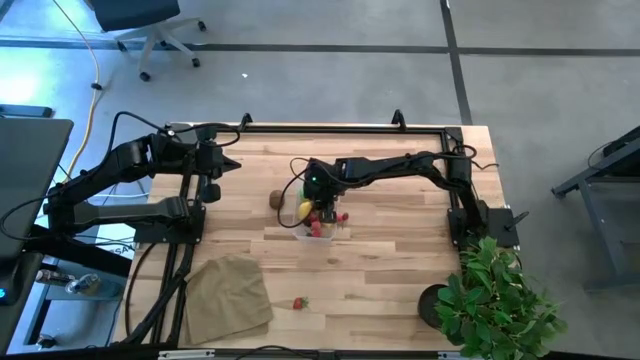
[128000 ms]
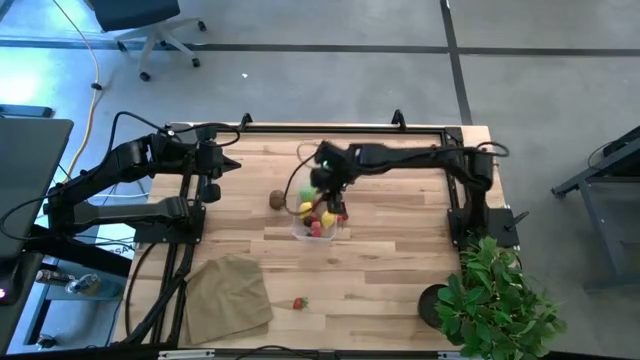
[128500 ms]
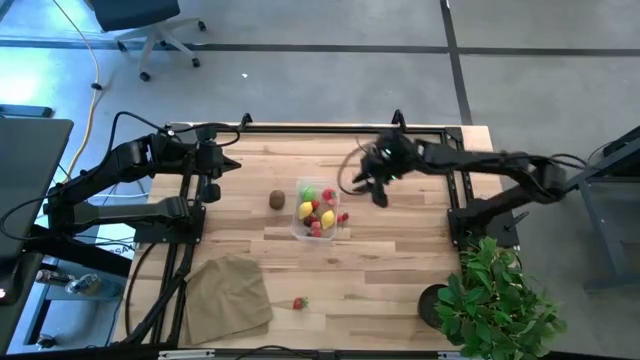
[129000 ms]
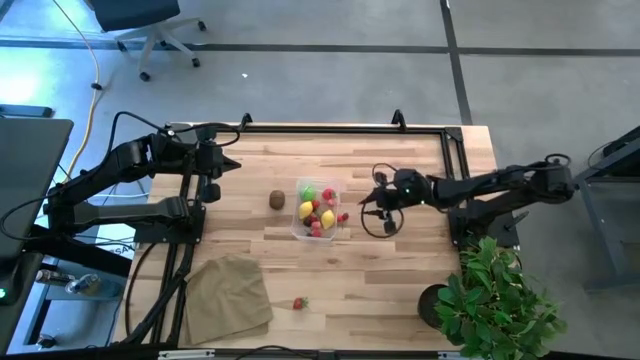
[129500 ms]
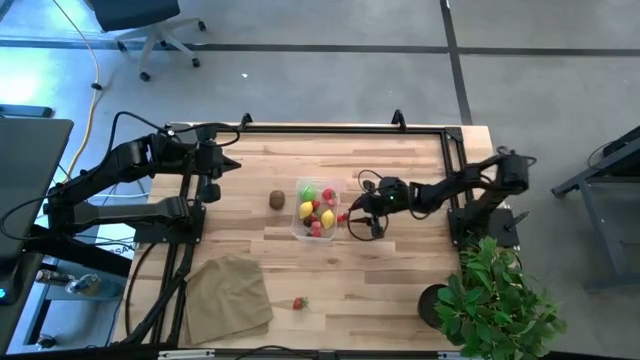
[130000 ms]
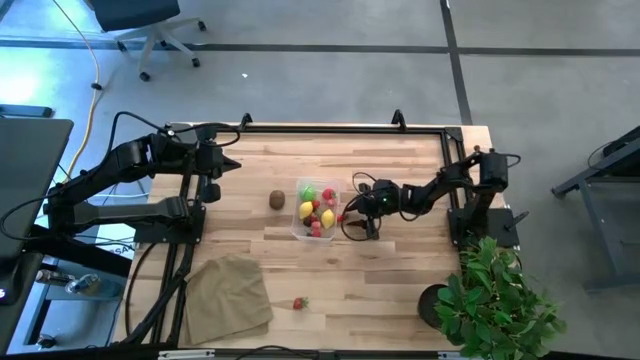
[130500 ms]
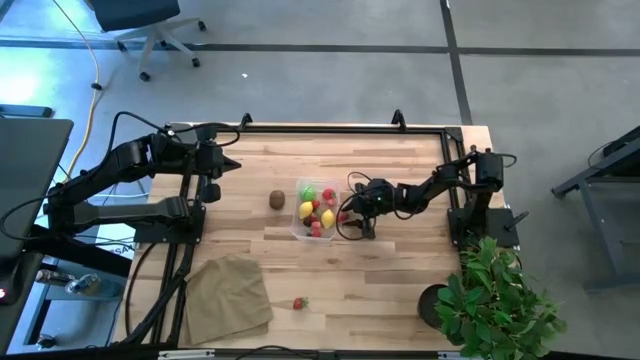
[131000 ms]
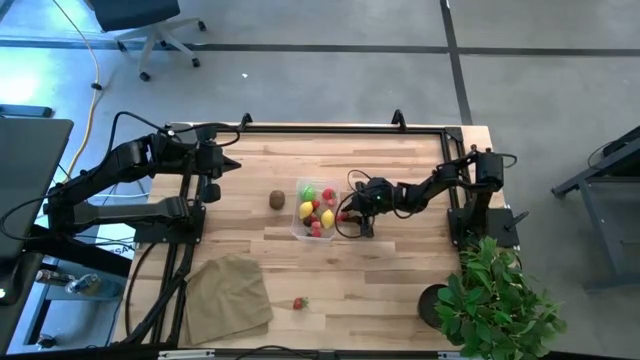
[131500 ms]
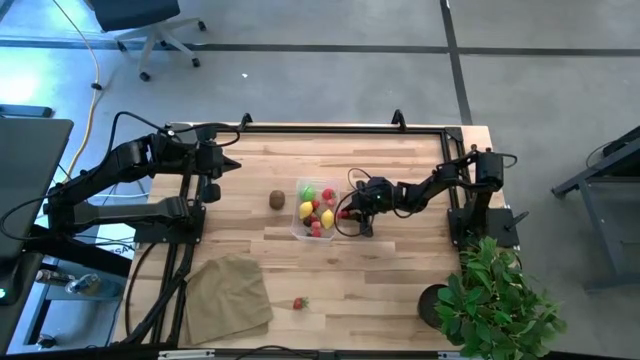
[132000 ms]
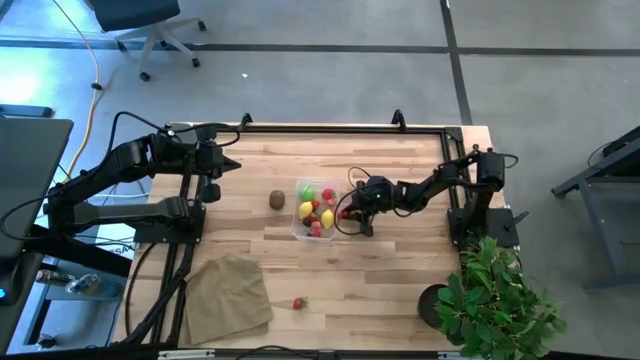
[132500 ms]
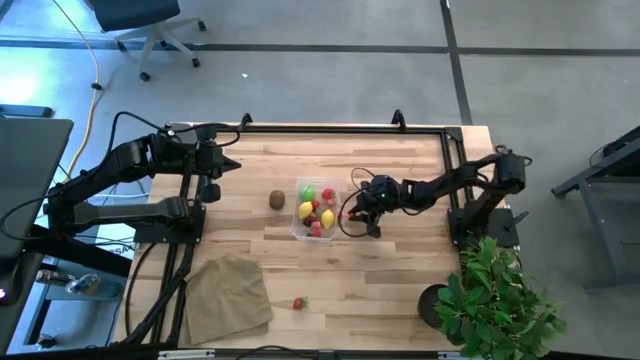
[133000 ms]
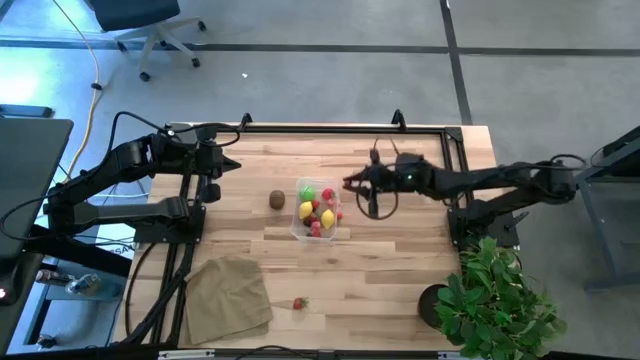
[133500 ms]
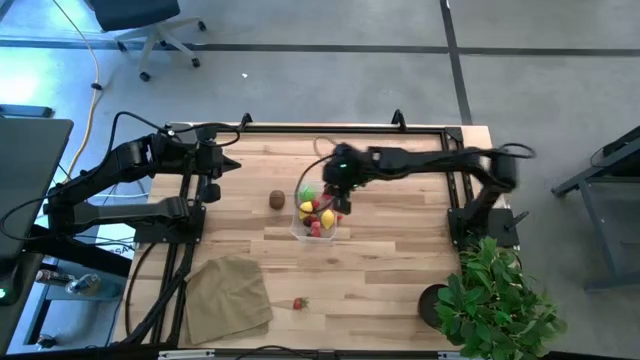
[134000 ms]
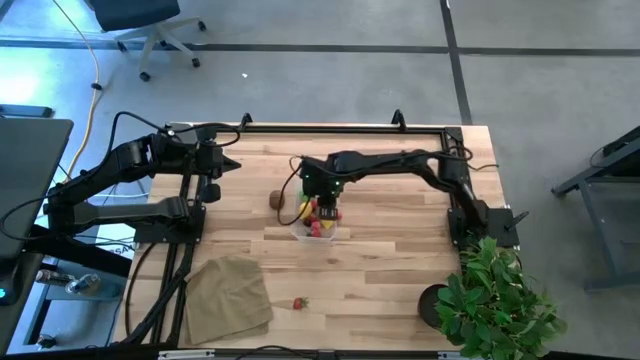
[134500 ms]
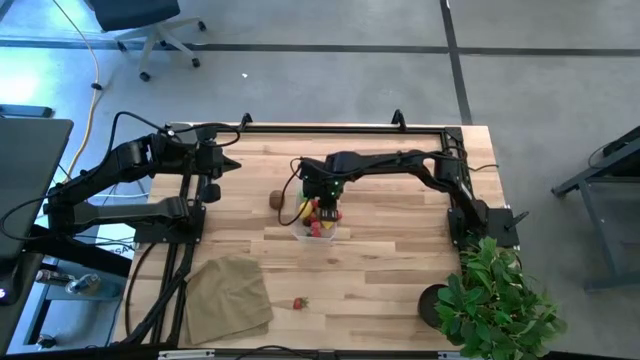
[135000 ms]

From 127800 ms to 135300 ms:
Task: Pick and placing Produce into tupperware
Put the dark red cherry into the transparent bin

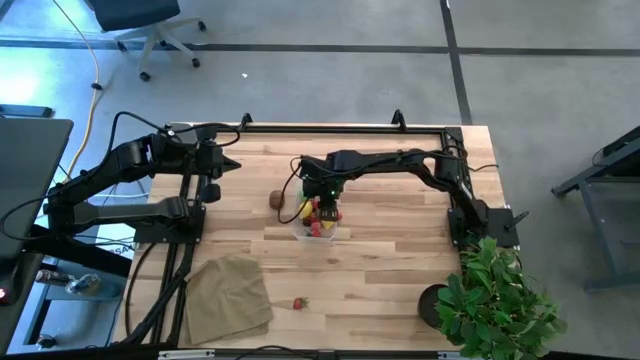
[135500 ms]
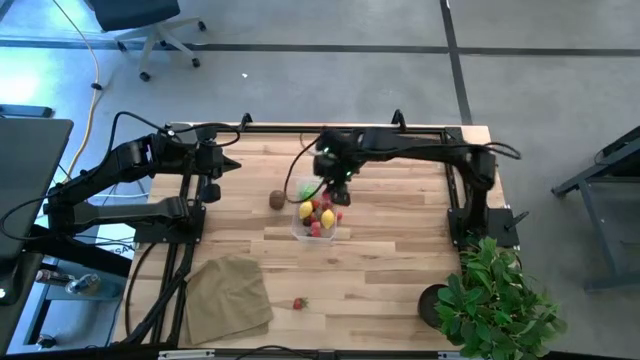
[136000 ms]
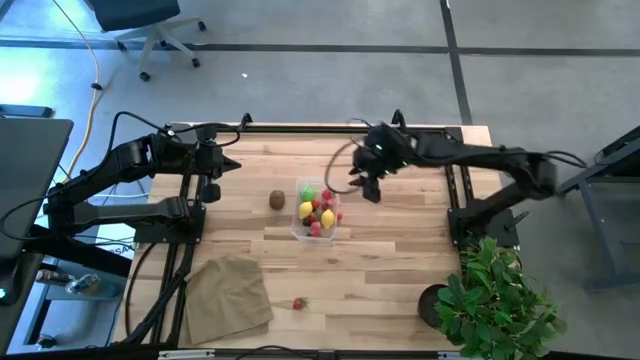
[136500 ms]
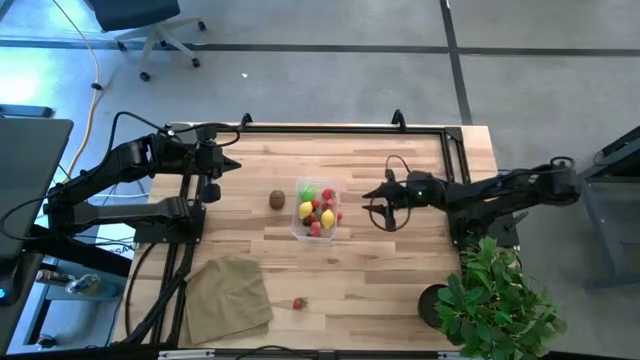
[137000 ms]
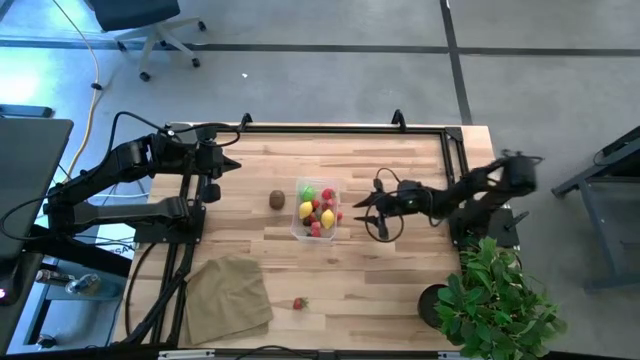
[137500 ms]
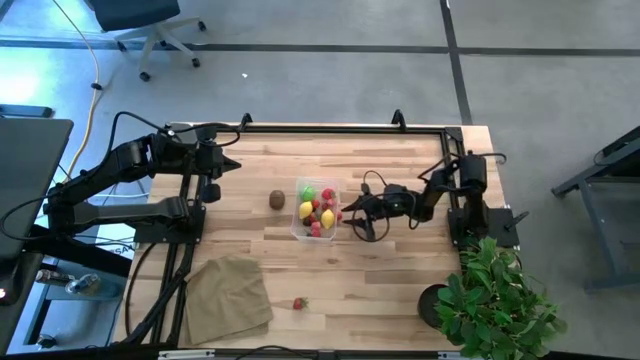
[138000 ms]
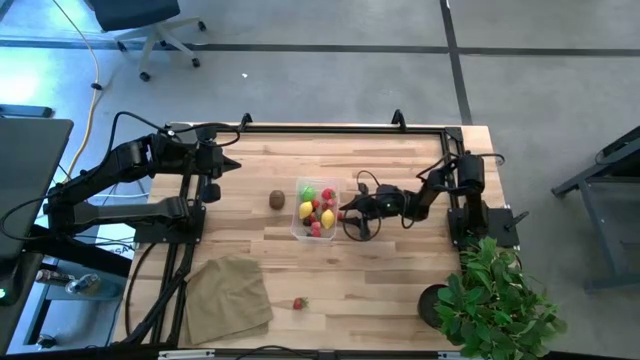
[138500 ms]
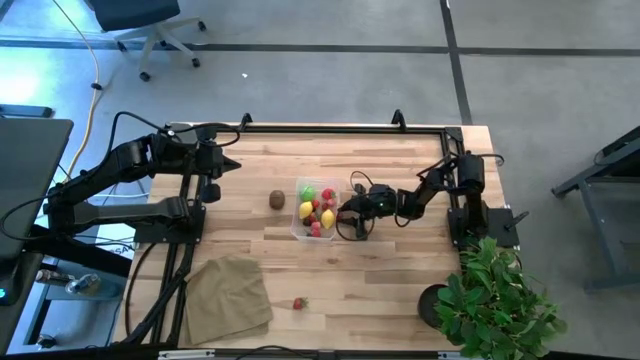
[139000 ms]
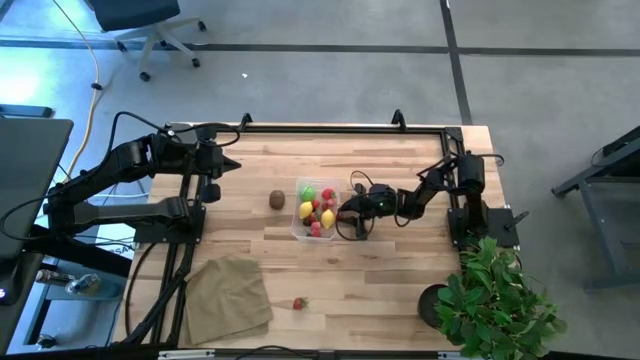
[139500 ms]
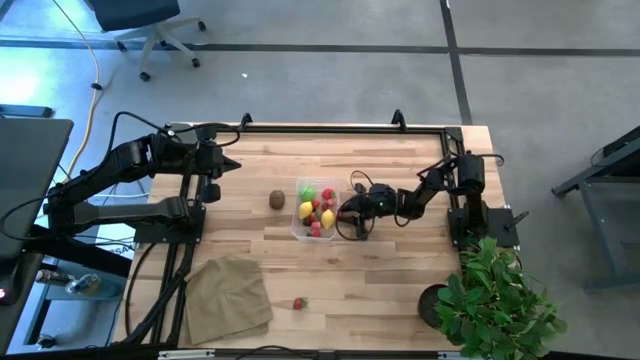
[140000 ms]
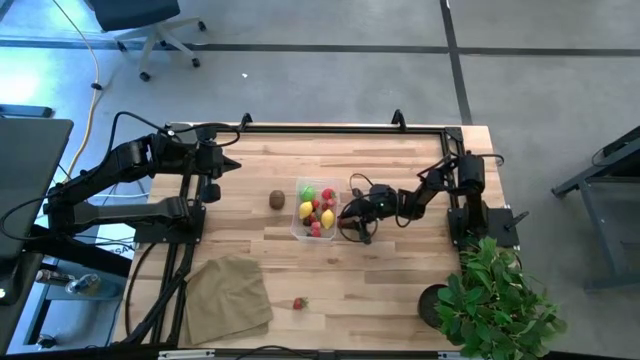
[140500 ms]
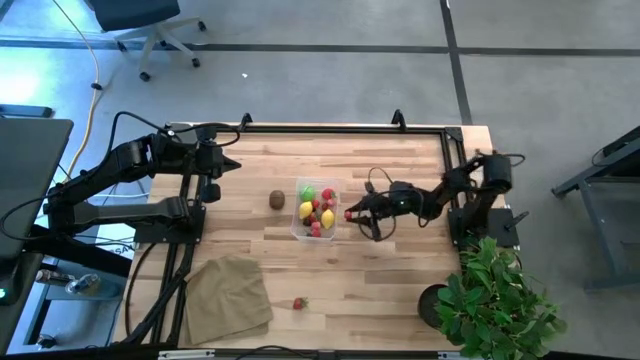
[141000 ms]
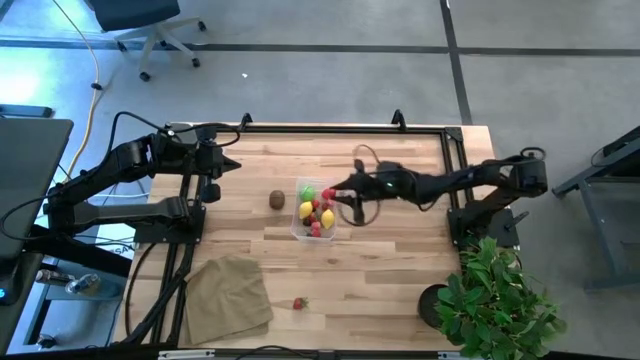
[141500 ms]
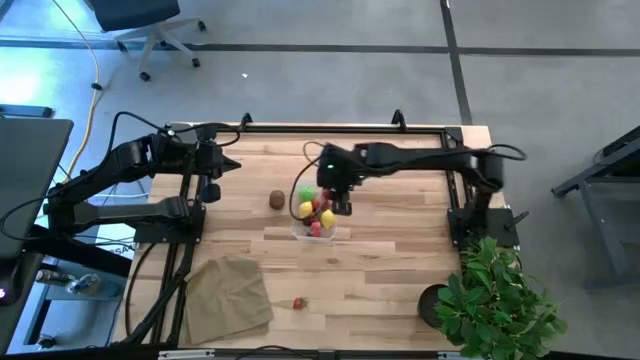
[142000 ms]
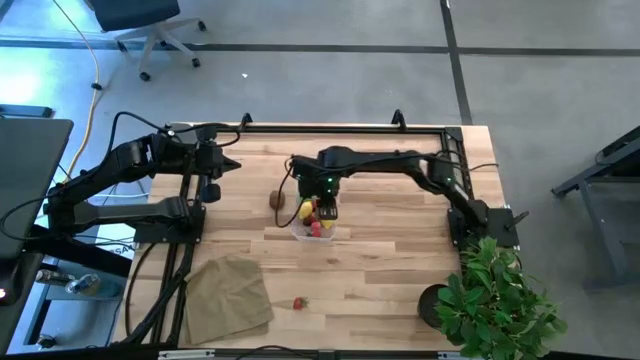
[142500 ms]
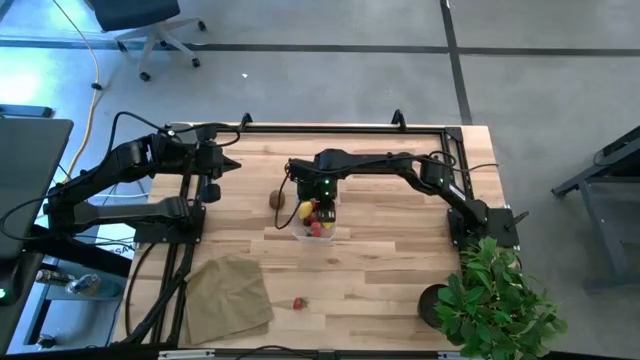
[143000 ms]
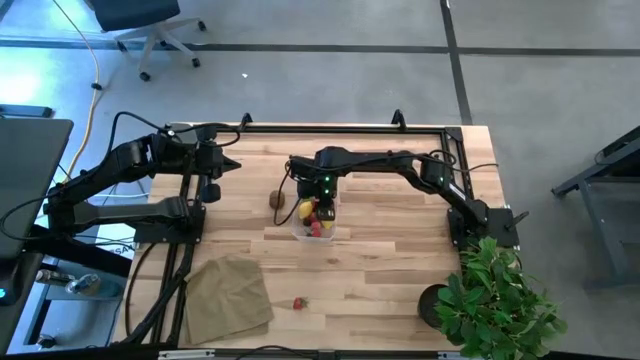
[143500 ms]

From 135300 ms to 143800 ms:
Put the red cherry into the transparent bin

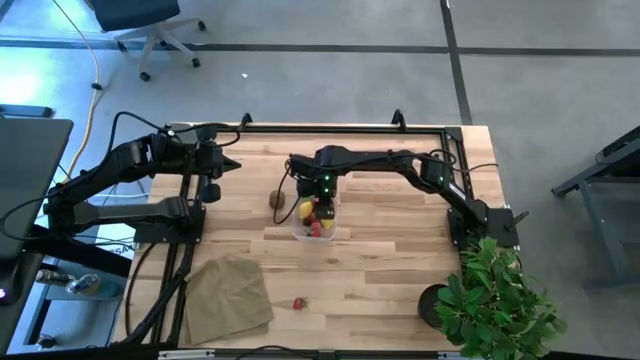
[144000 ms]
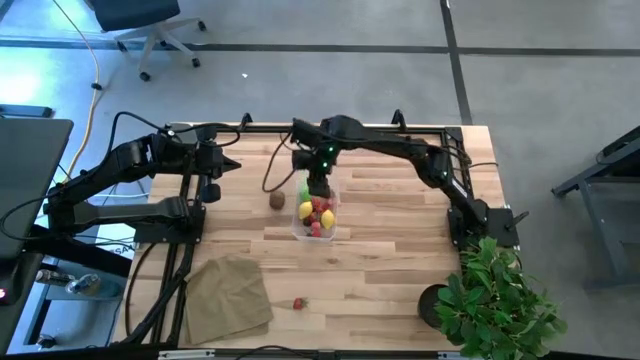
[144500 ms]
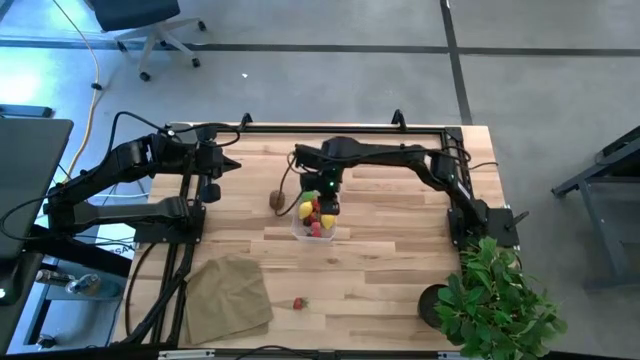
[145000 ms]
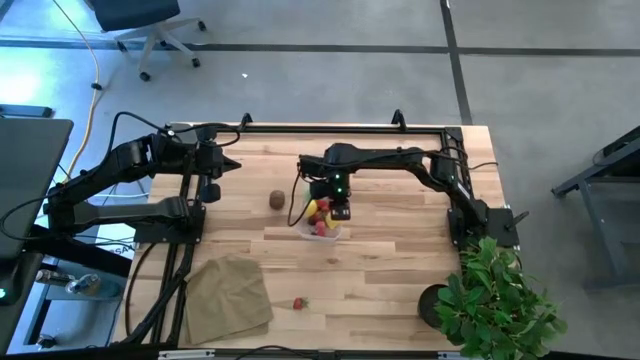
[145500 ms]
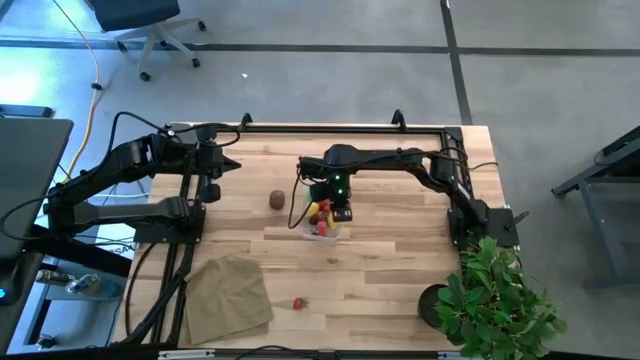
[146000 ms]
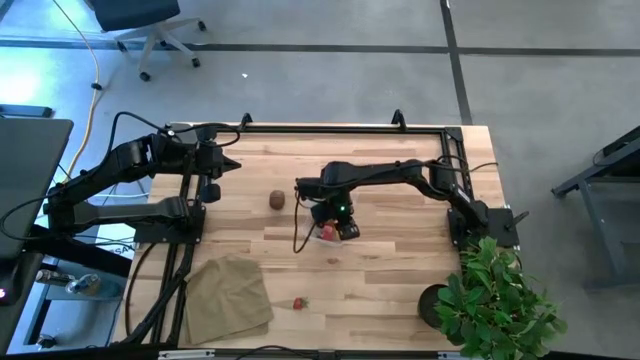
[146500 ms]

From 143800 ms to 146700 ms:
Adjust the transparent bin to the center of the table

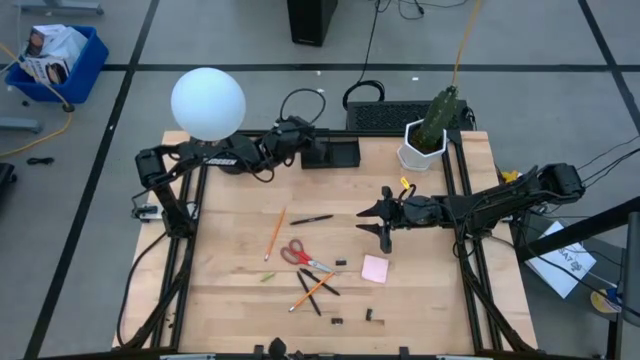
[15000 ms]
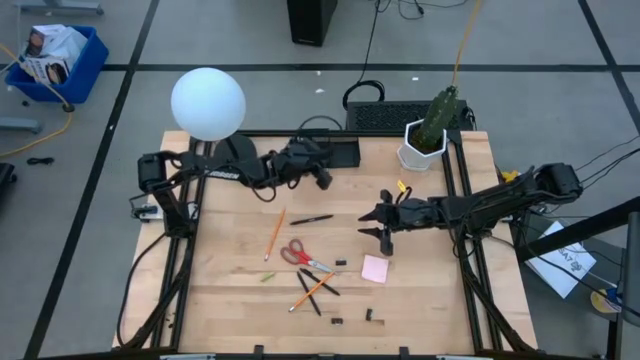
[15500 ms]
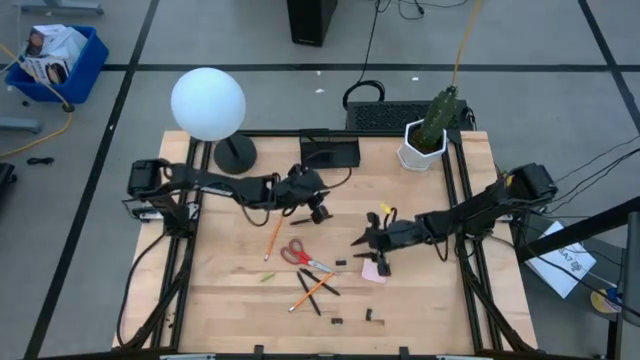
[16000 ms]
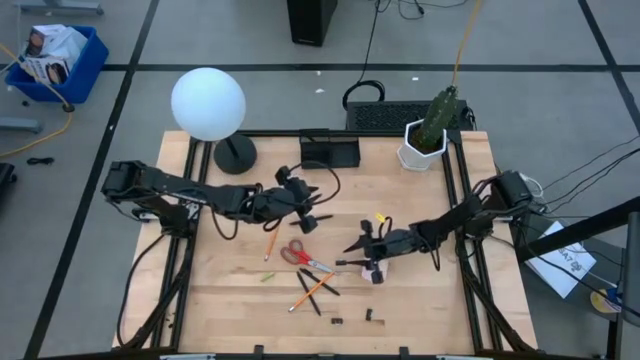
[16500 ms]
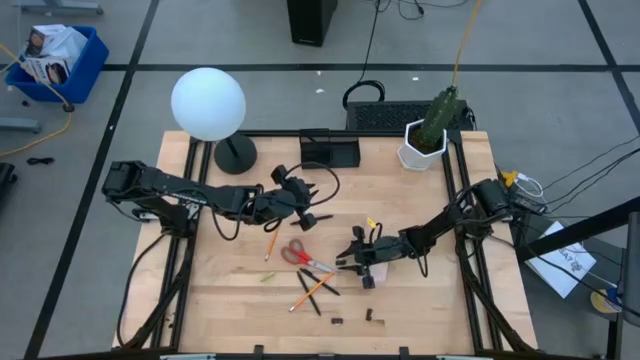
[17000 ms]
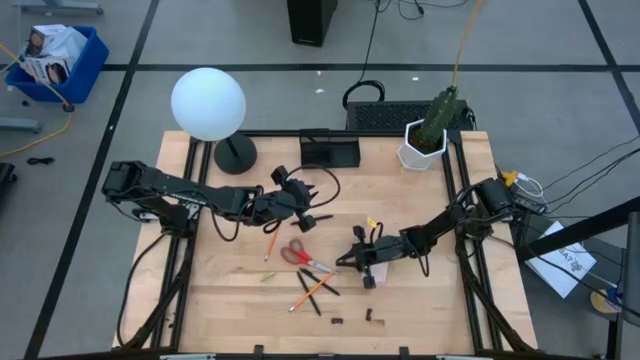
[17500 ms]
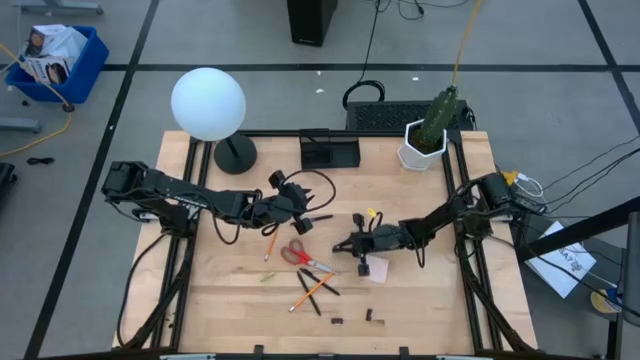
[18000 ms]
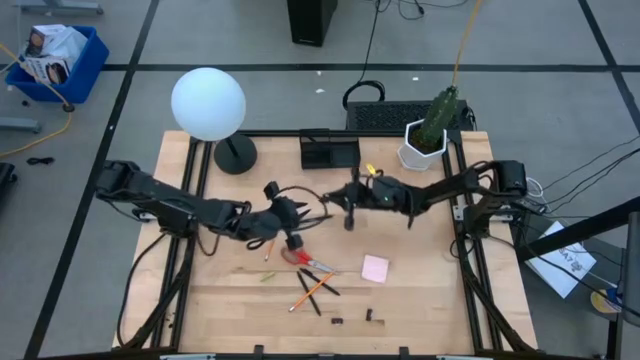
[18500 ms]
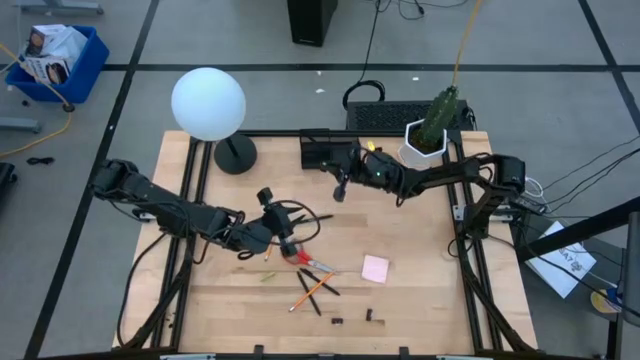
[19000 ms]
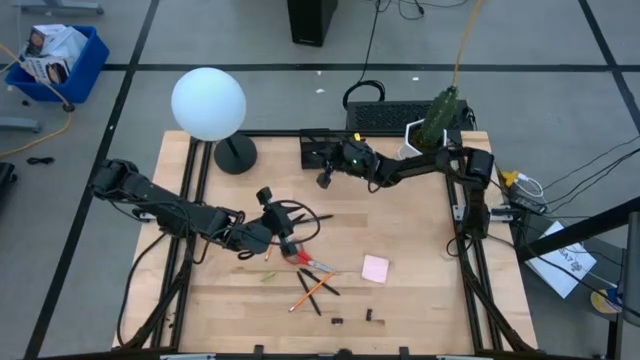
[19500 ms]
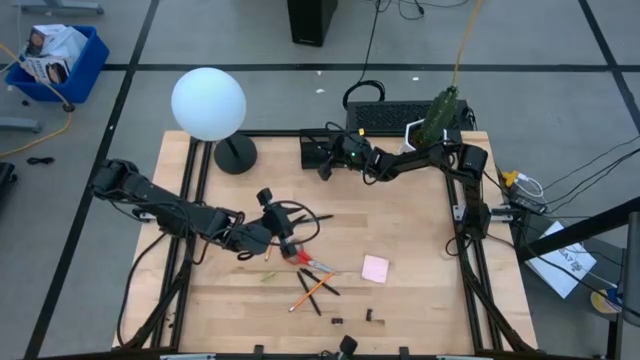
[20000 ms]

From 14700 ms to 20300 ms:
Task: Pick and place office supplies into organizer
Put the binder clip into the desk organizer
